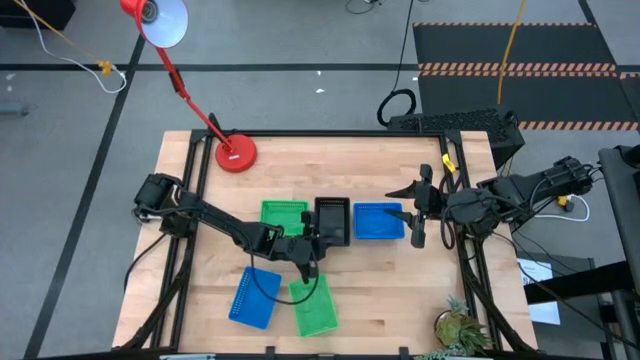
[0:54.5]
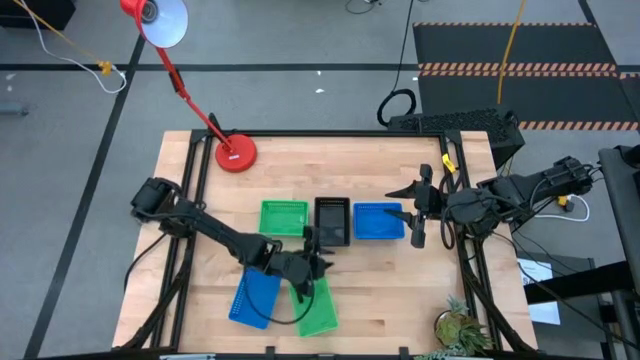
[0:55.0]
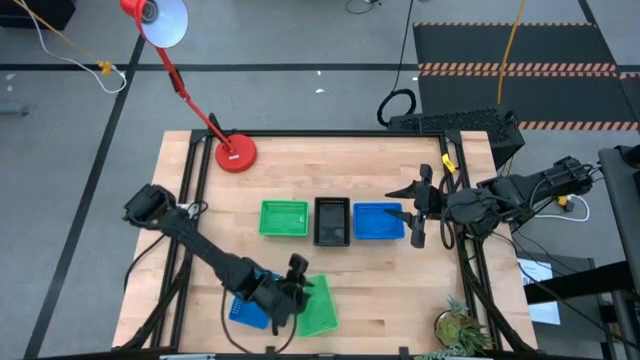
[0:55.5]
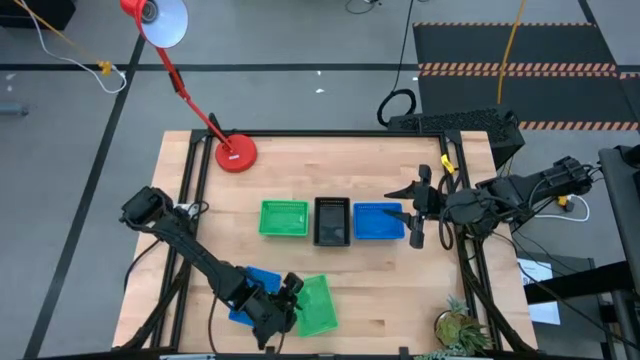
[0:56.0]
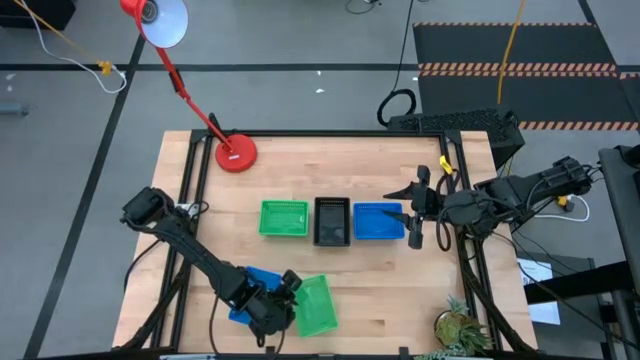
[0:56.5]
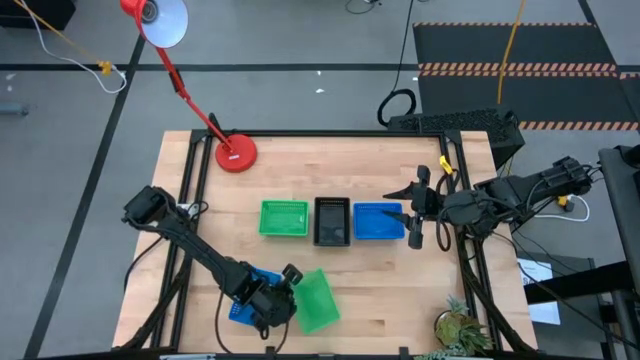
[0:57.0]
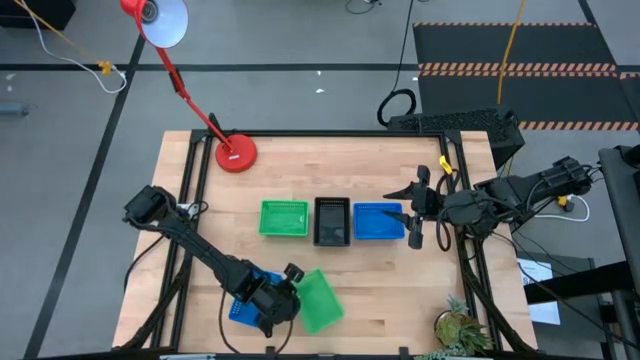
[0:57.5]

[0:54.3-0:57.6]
Stack the bottom green bin on the top green bin

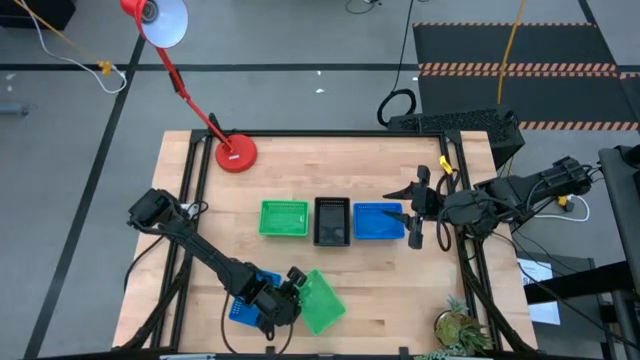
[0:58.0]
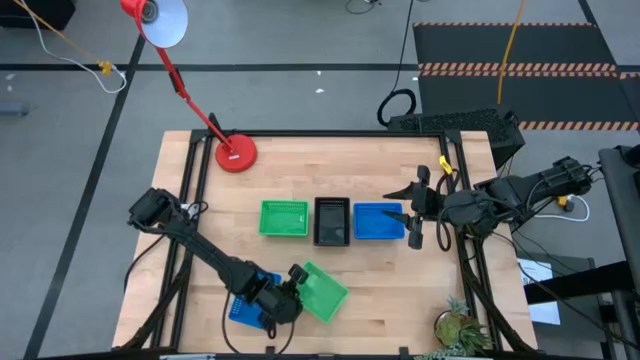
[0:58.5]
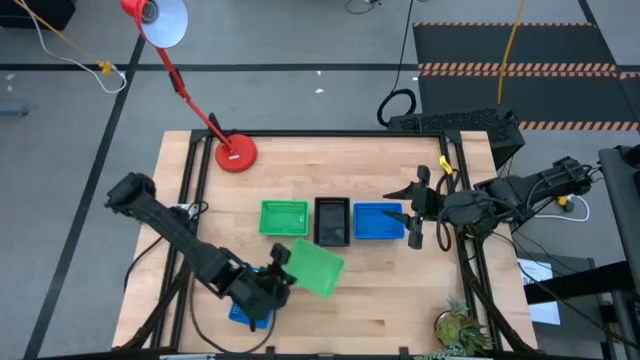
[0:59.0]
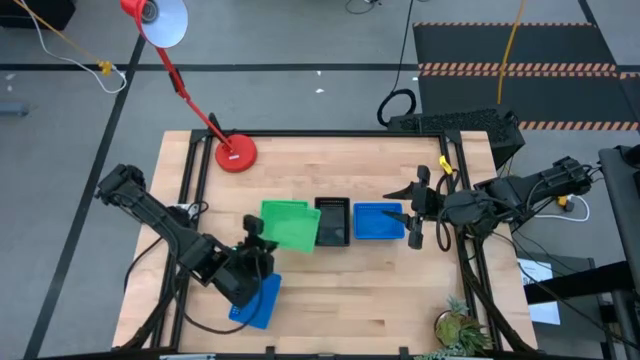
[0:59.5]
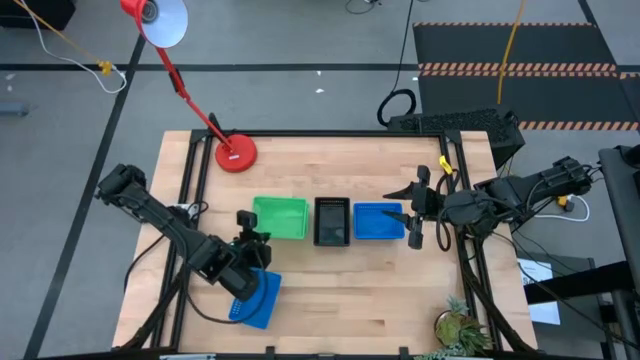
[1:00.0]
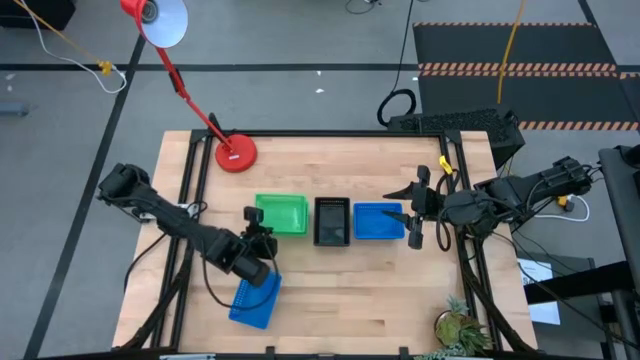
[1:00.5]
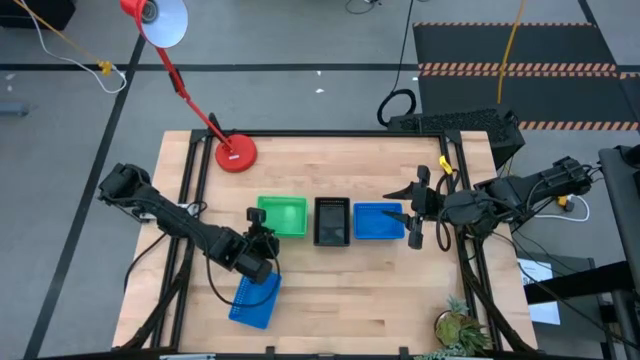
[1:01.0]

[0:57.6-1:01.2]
Stack the bottom green bin on the top green bin

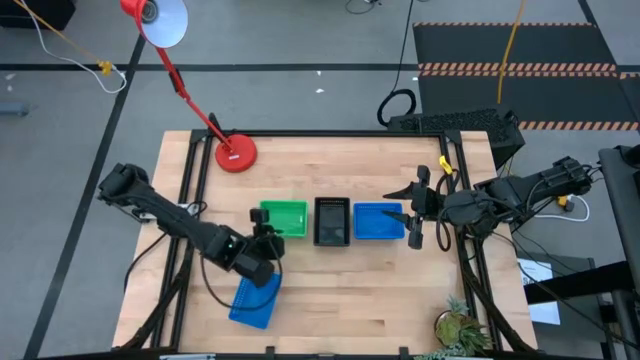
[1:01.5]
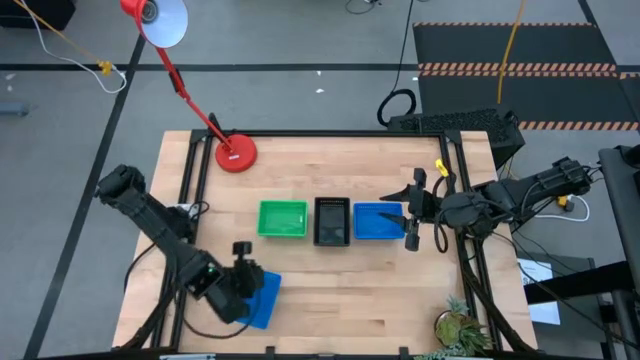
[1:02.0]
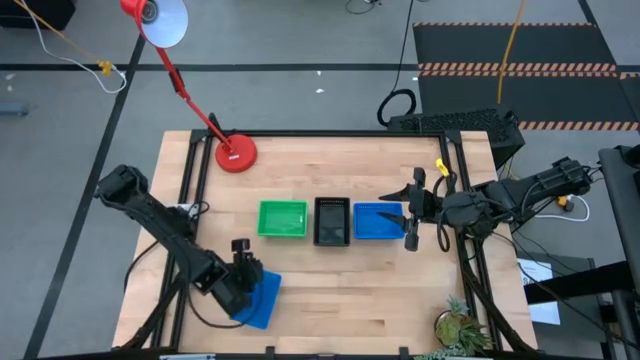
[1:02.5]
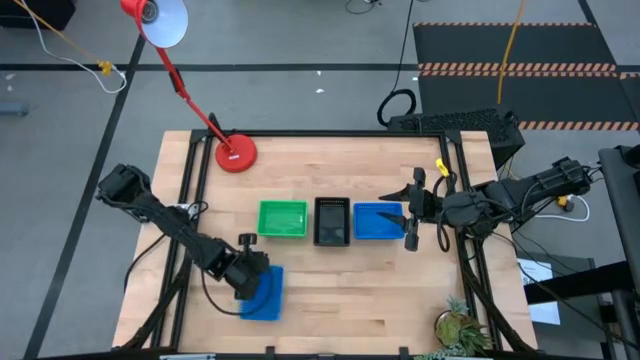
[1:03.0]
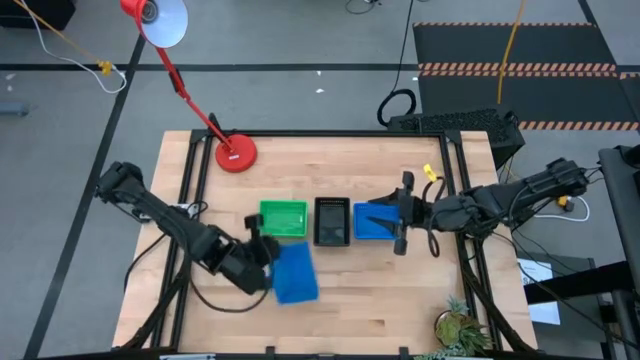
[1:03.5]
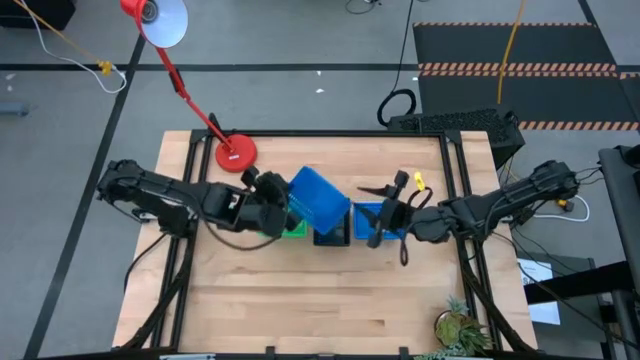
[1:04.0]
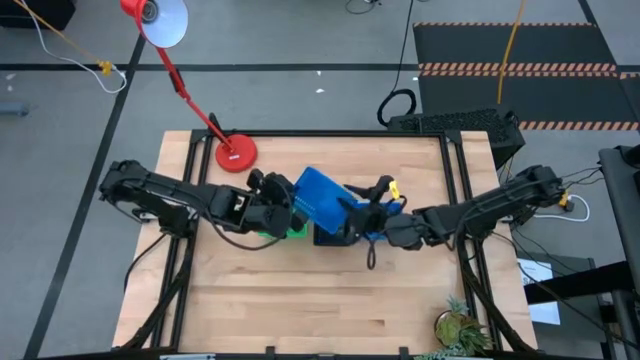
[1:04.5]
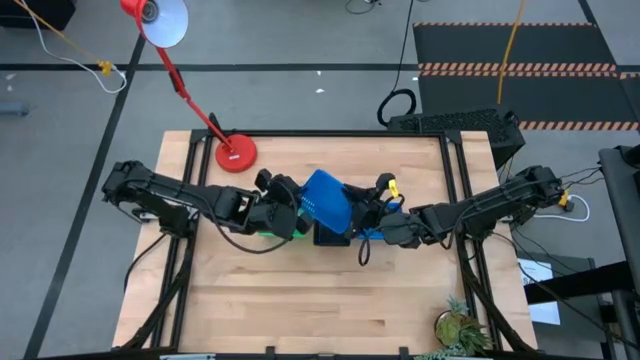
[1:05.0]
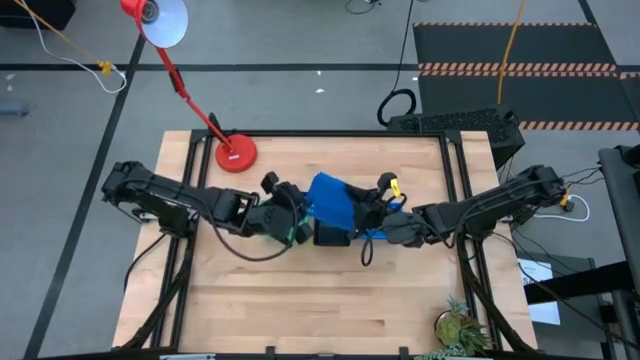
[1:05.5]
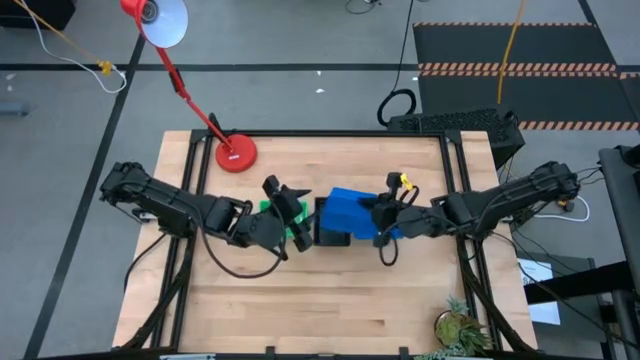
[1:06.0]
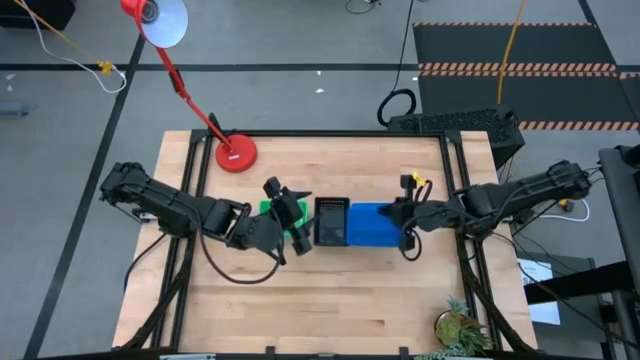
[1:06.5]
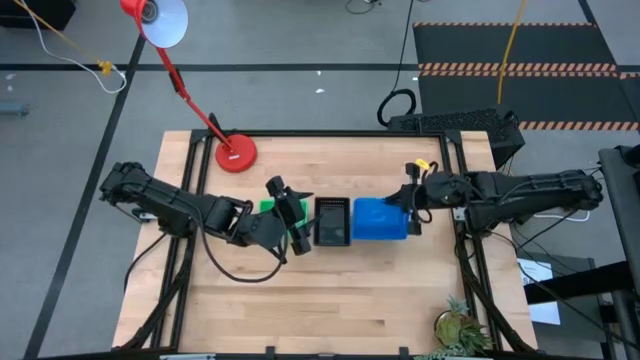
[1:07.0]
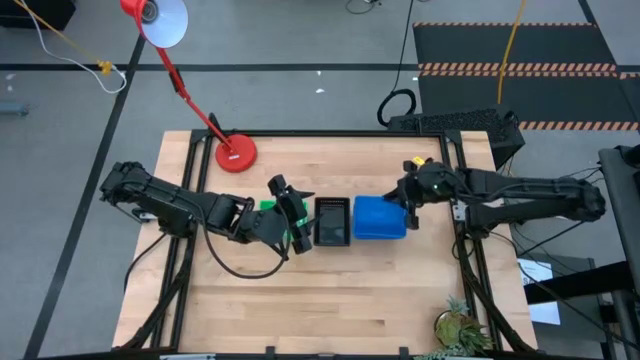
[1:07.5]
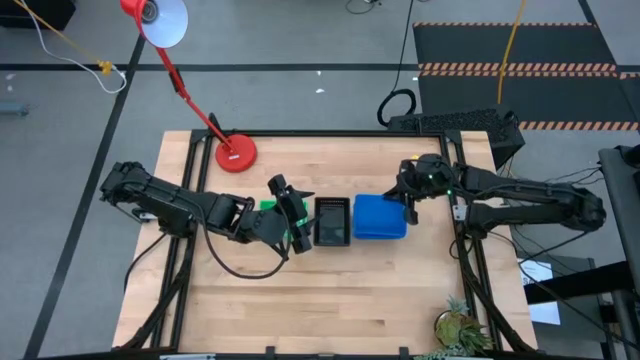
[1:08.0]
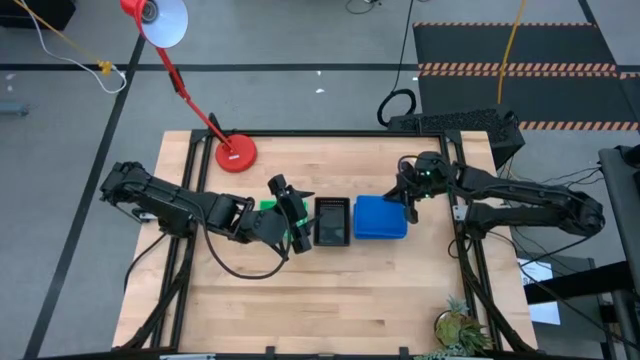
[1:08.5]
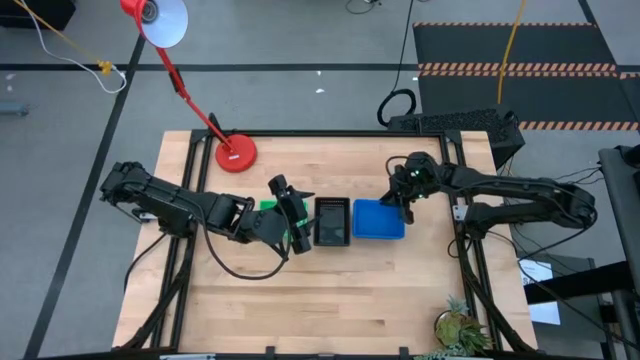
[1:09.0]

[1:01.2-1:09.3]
Stack the bottom blue bin on the top blue bin

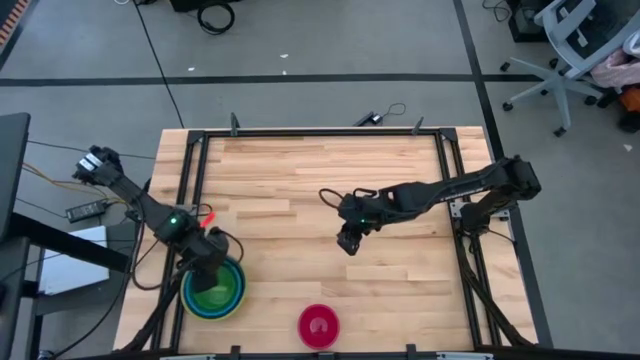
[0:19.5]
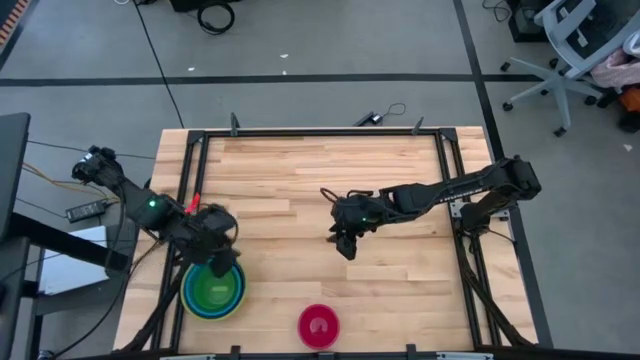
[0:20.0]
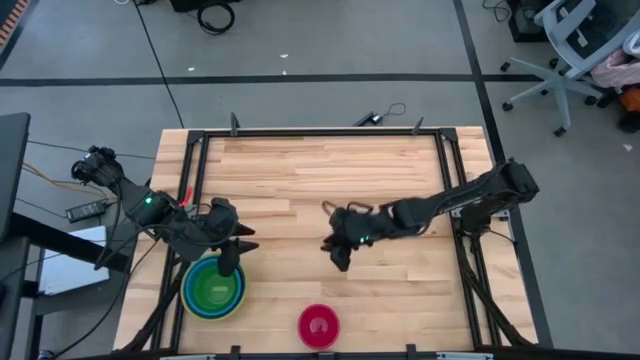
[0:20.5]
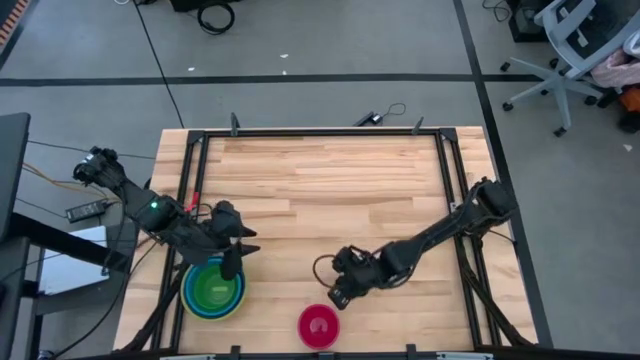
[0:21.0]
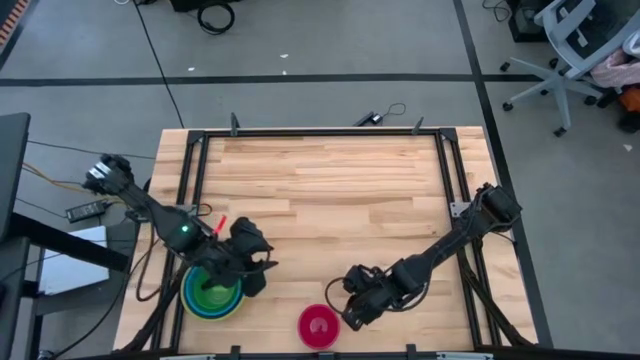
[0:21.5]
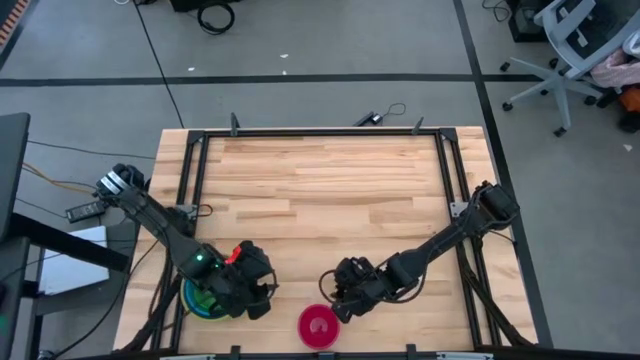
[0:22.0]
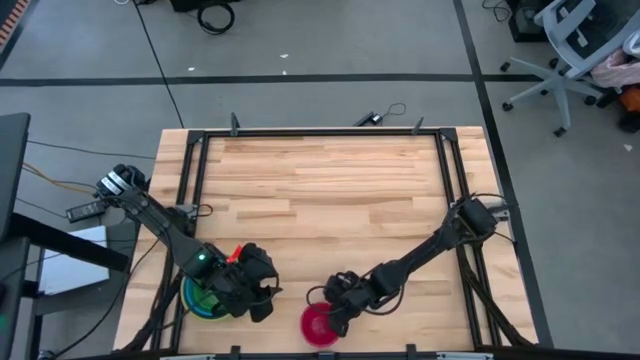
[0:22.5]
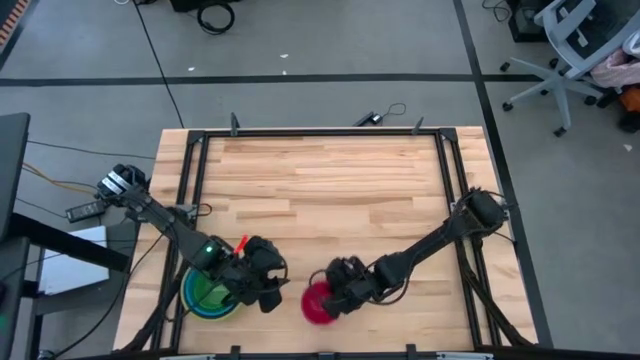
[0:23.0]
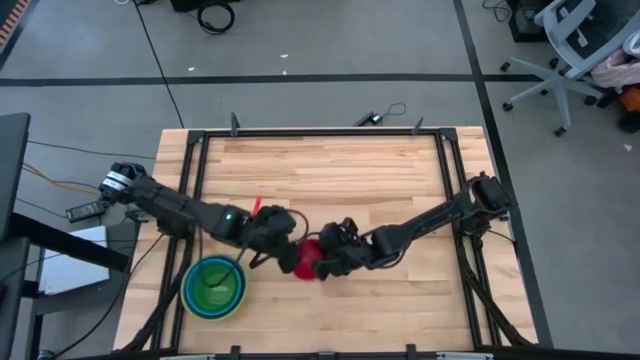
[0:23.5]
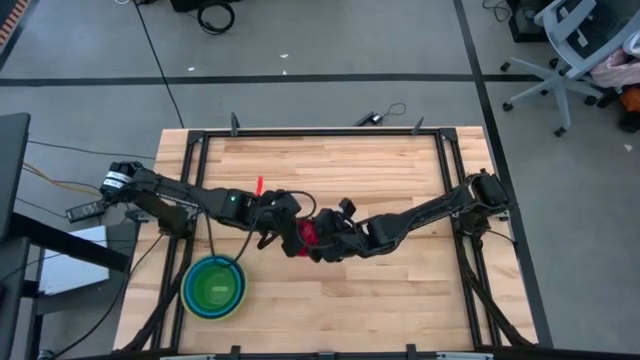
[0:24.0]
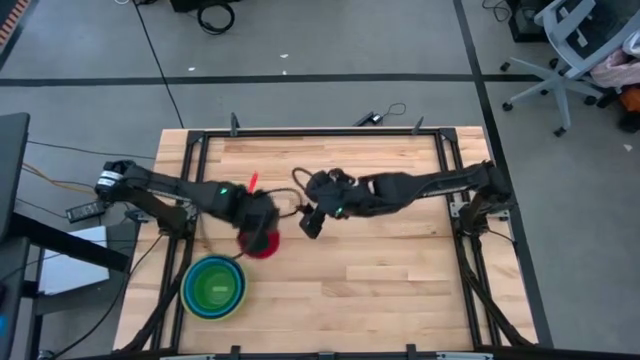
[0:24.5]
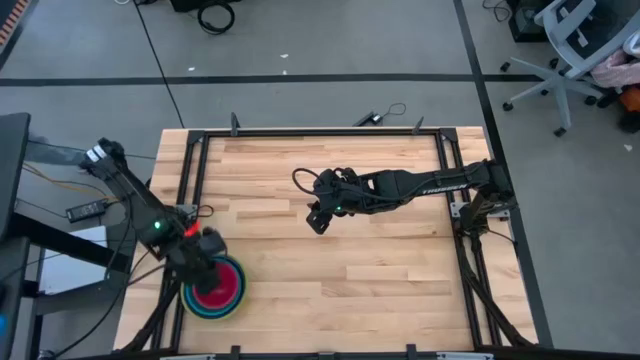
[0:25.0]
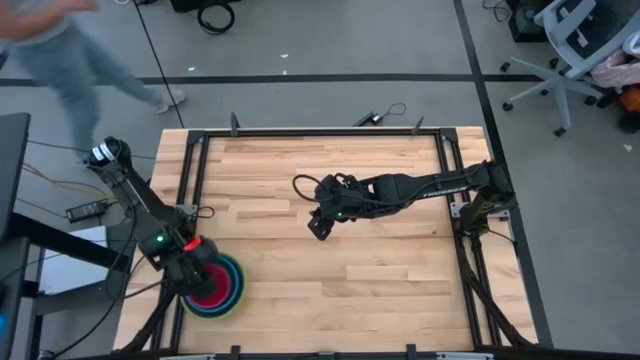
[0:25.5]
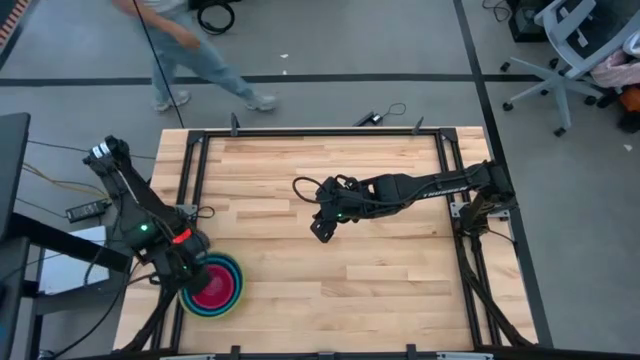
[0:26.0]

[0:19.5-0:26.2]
Stack the pink bowl on top of the light green bowl
